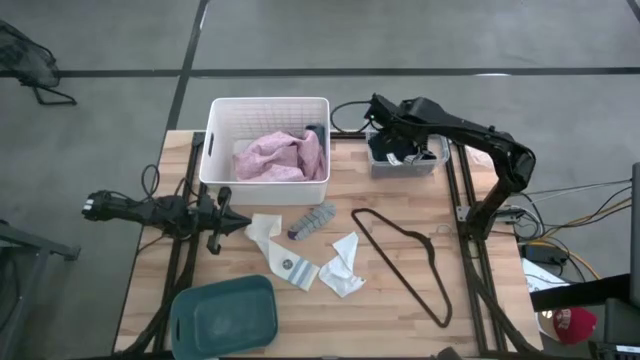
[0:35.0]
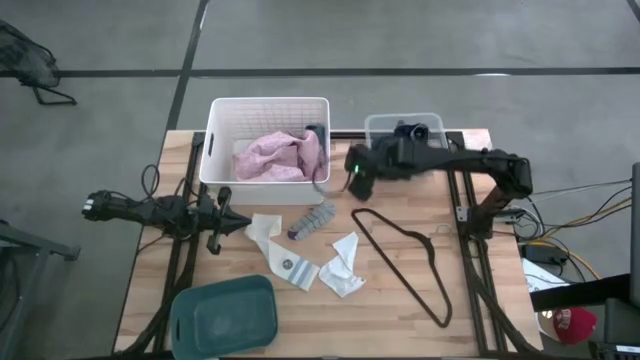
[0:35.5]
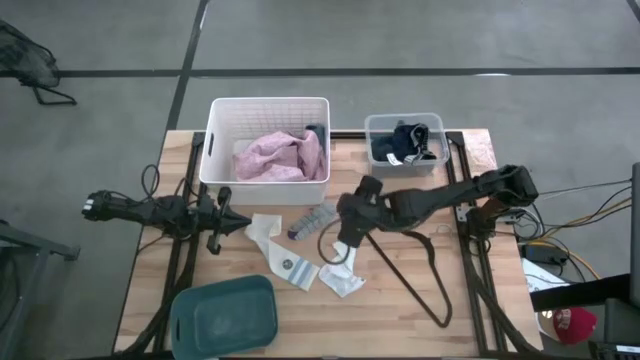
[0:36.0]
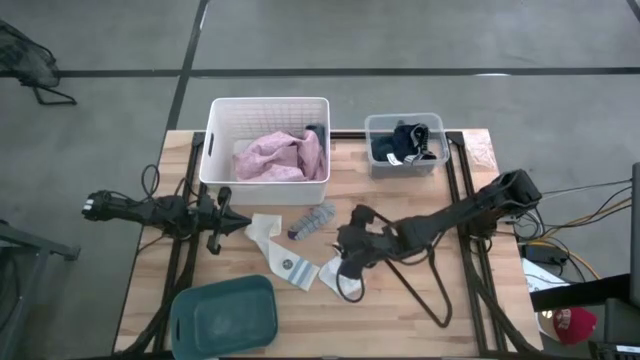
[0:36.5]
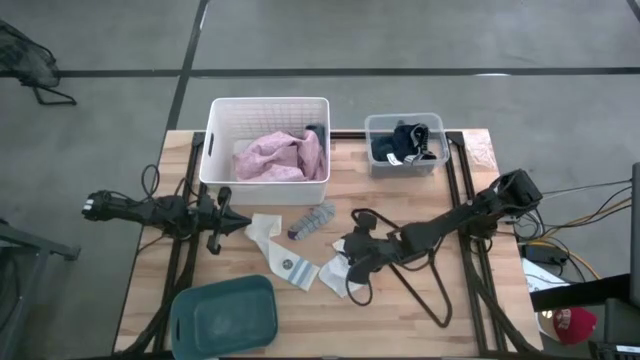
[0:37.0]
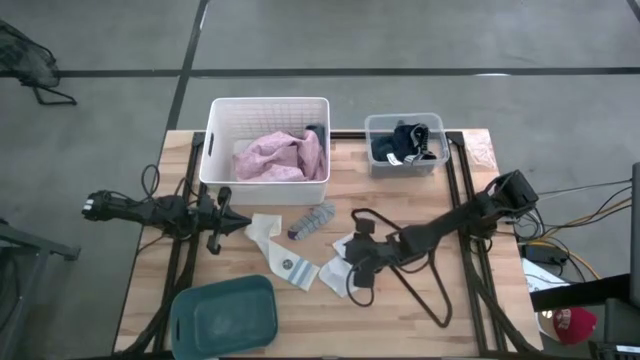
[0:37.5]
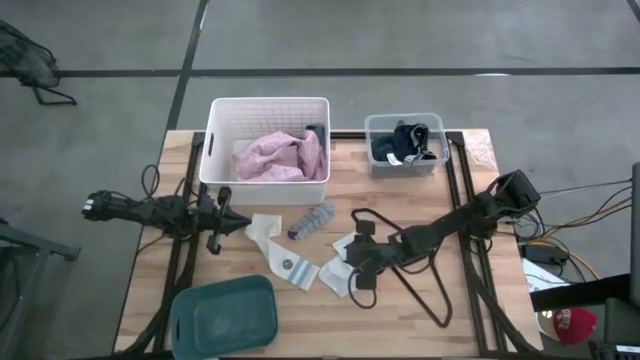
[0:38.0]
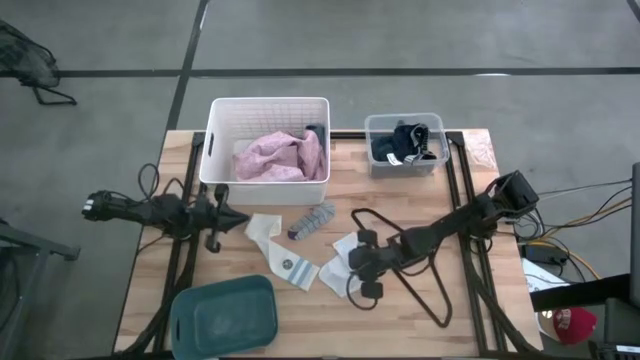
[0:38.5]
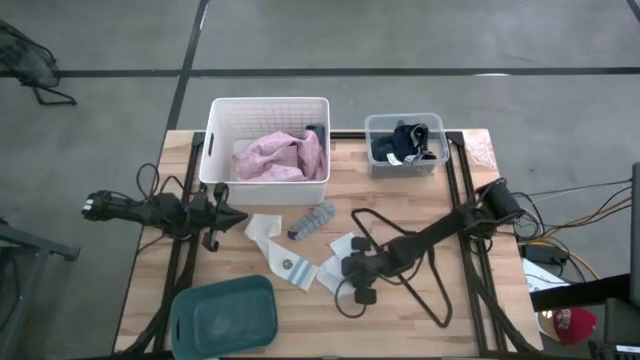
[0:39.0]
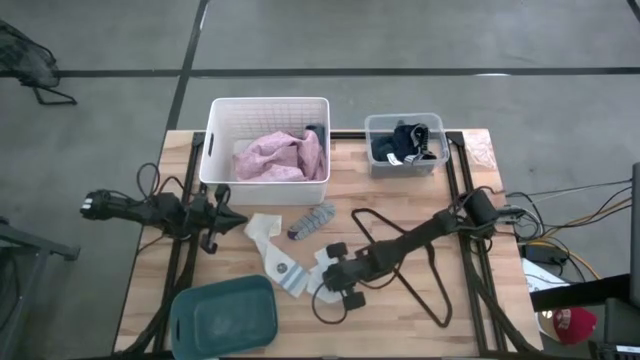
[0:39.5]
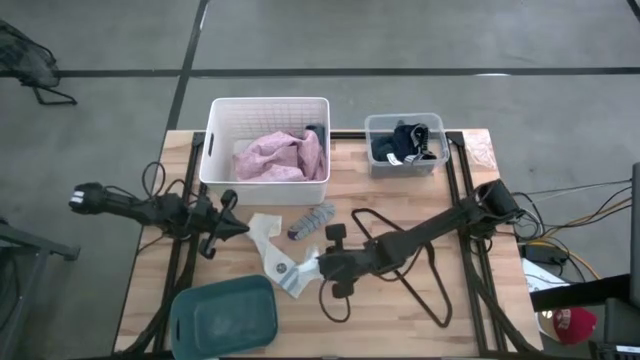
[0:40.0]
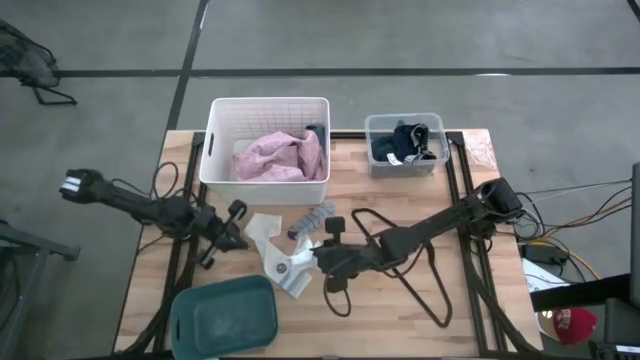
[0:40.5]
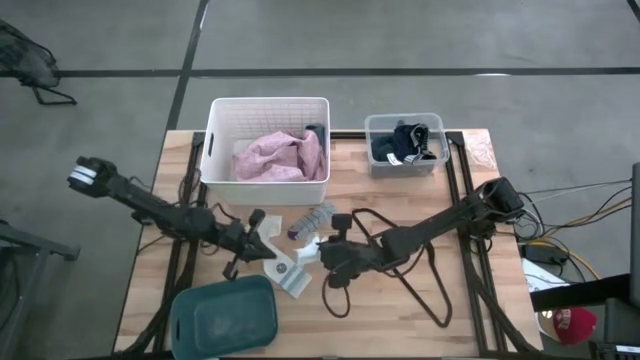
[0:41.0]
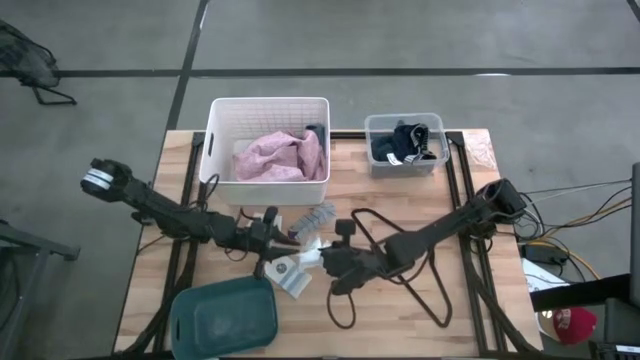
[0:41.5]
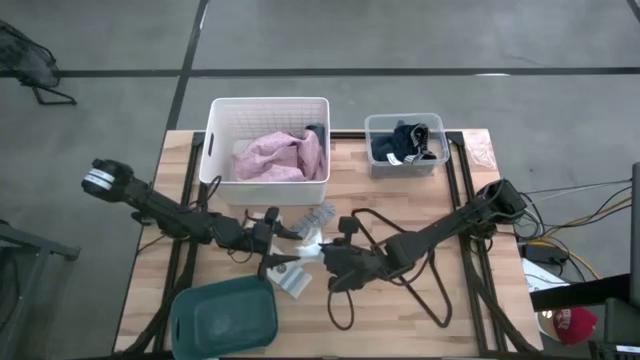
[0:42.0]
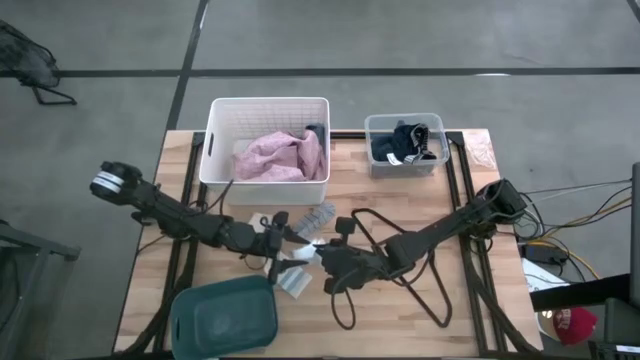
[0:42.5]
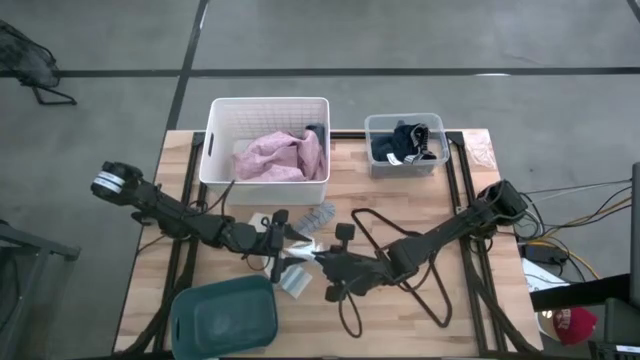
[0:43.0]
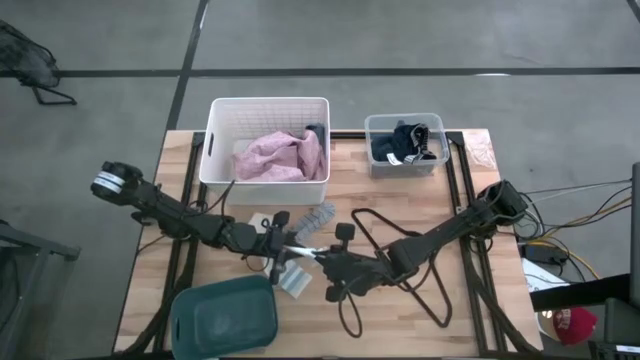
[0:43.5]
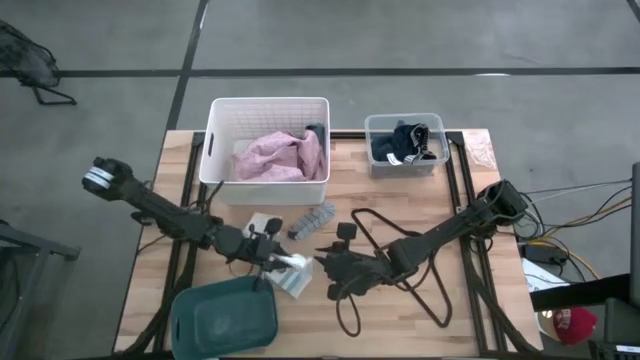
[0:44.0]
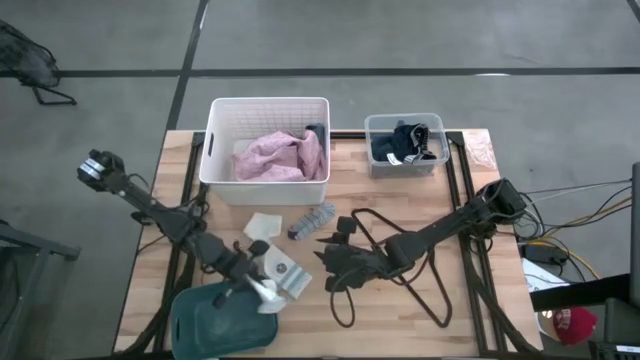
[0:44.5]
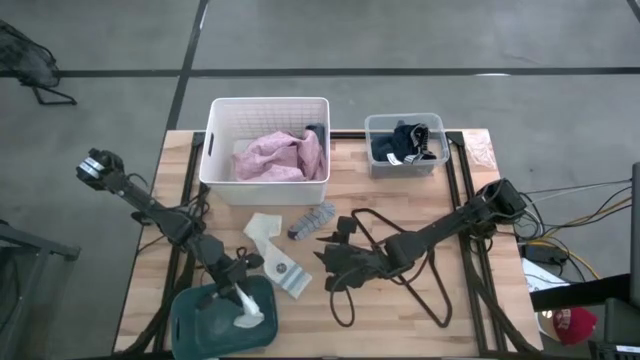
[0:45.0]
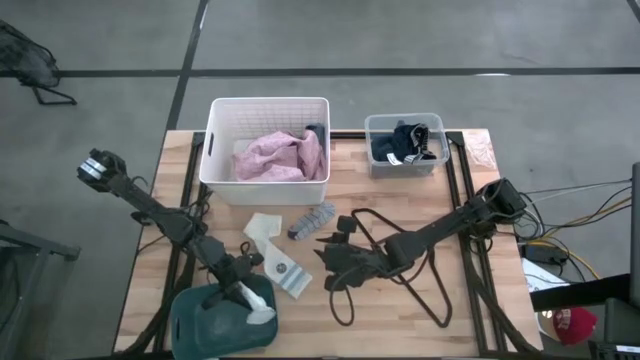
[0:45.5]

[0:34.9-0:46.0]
Task: Pick & Place Cloths
Put the white sock in the blue bin

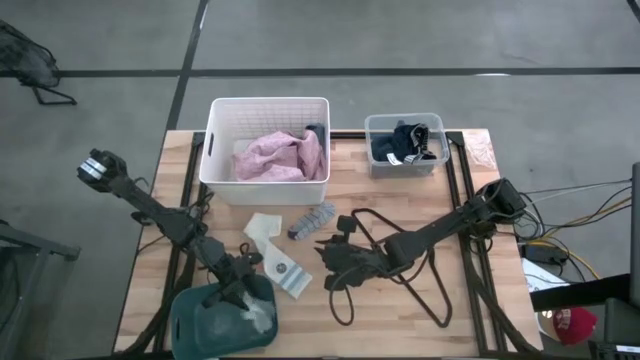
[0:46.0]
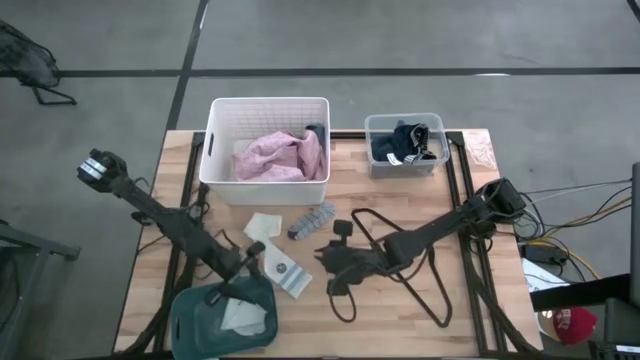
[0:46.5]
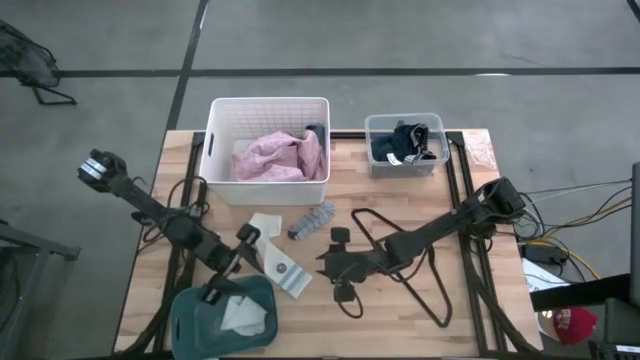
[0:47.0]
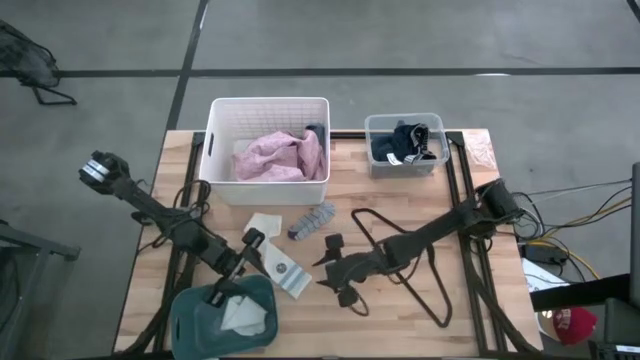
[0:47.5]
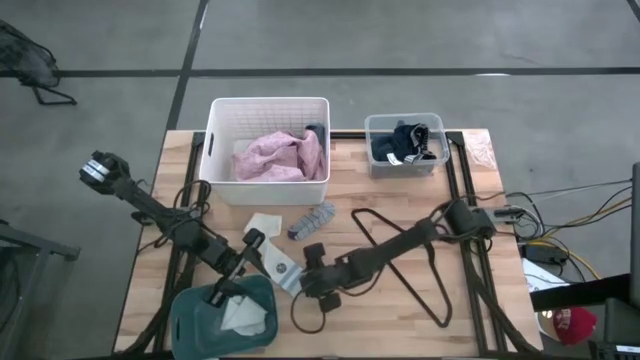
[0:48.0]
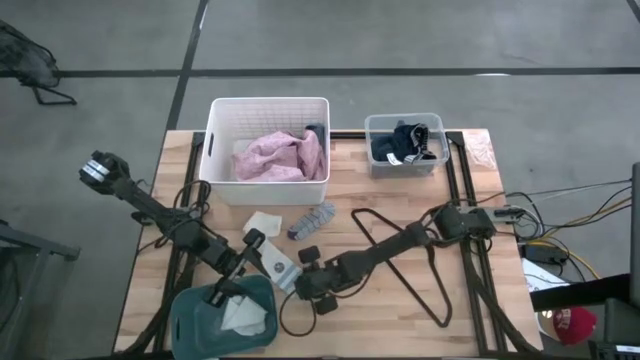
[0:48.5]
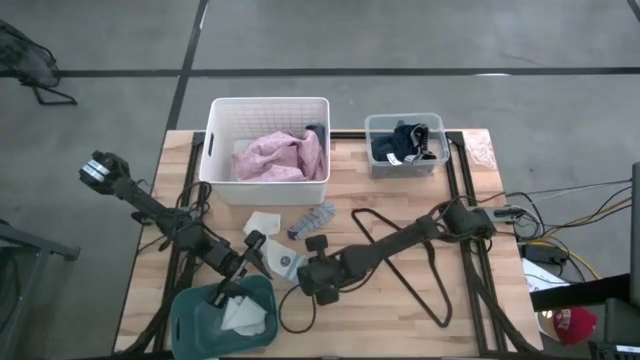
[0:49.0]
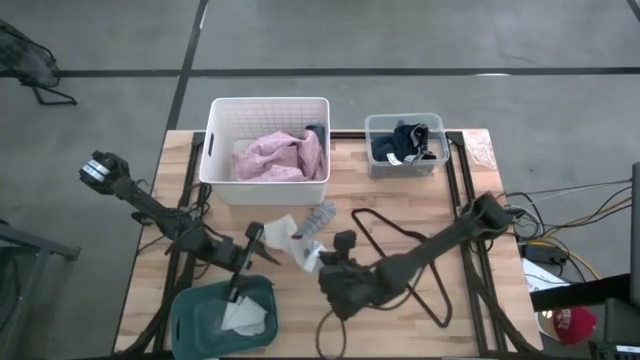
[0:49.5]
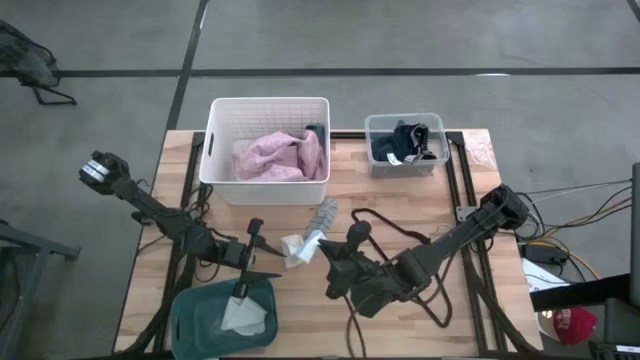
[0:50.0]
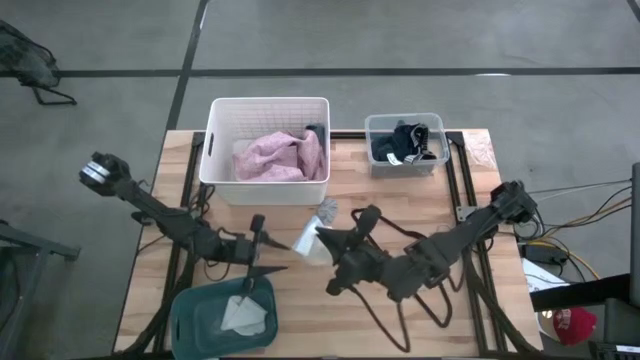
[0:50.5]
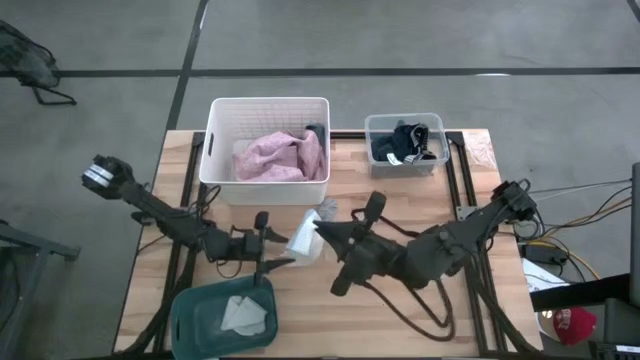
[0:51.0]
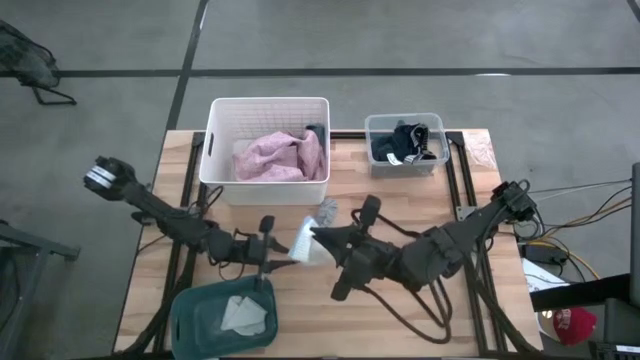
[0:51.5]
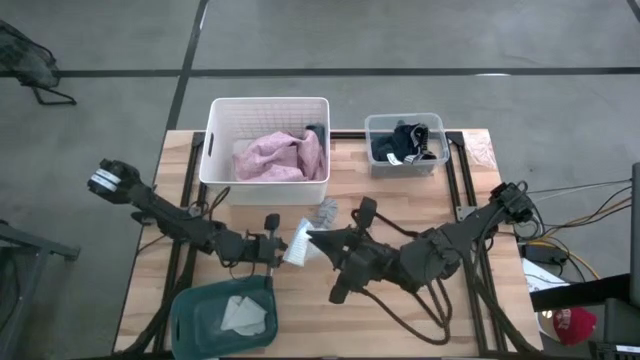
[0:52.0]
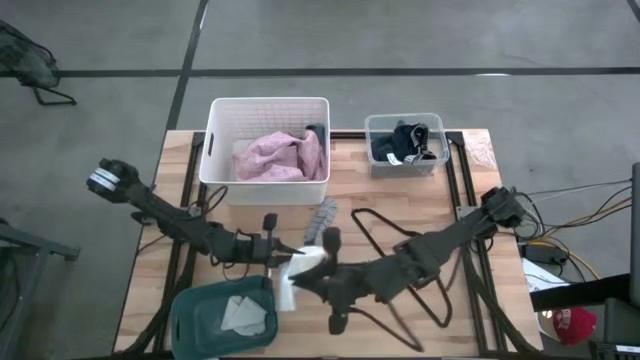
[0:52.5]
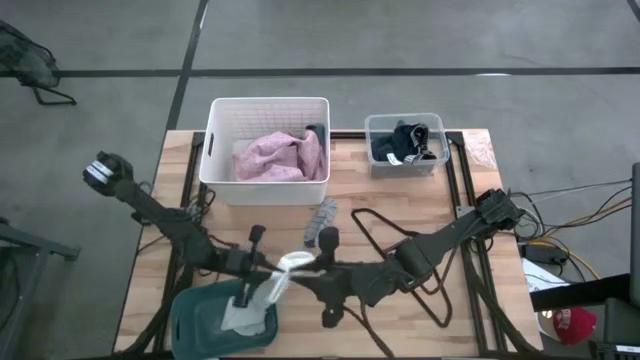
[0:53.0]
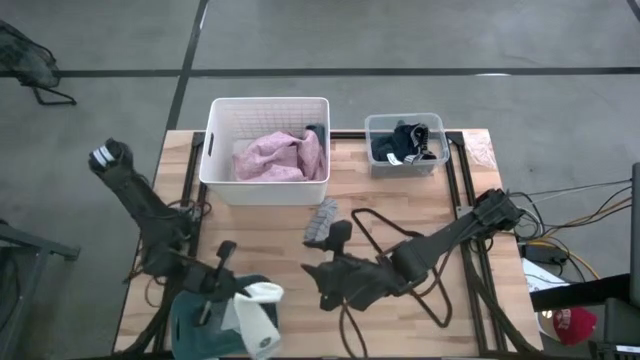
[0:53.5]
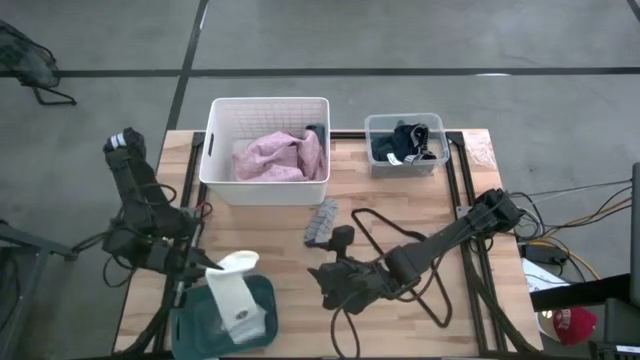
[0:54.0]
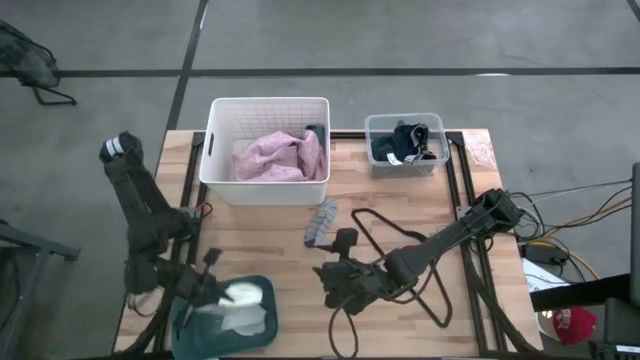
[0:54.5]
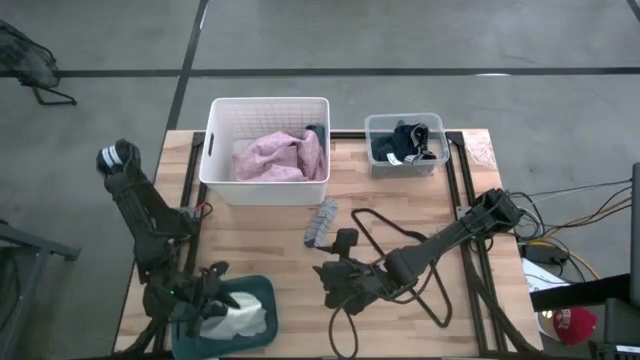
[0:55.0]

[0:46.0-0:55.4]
Put the blue sock in the blue bin

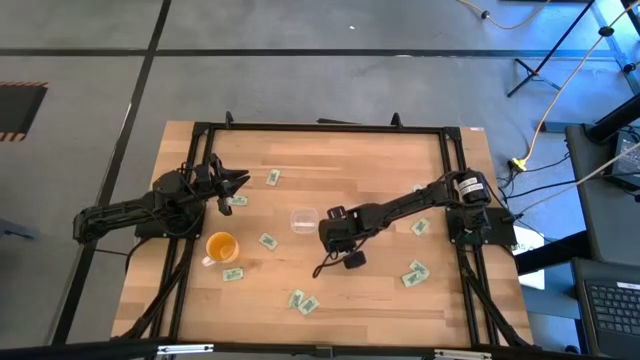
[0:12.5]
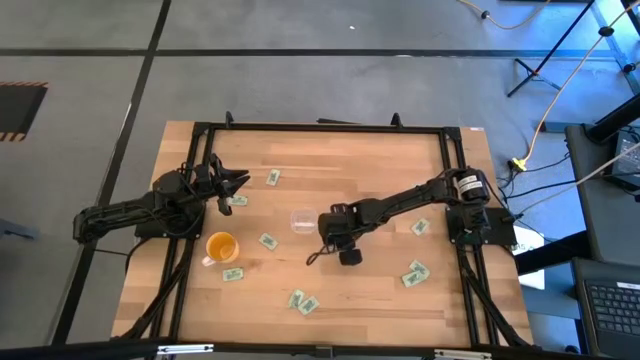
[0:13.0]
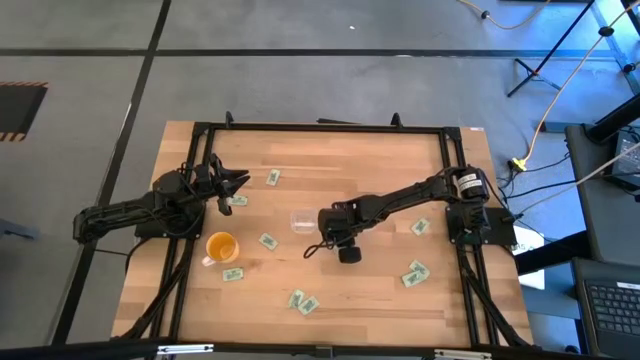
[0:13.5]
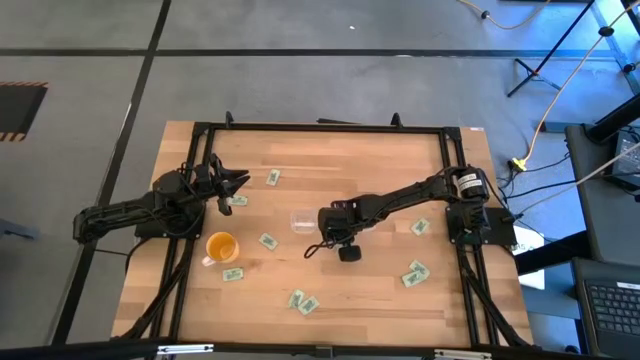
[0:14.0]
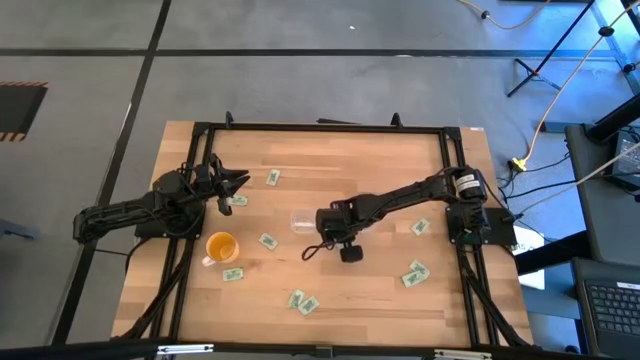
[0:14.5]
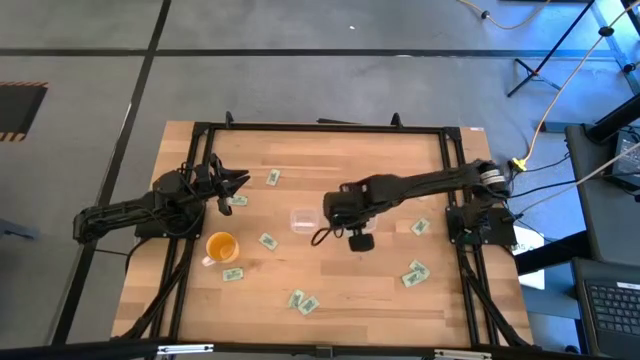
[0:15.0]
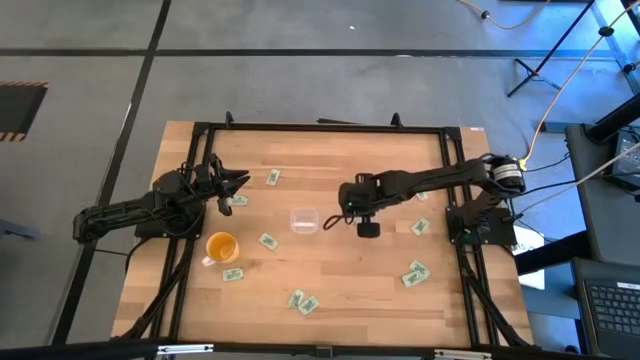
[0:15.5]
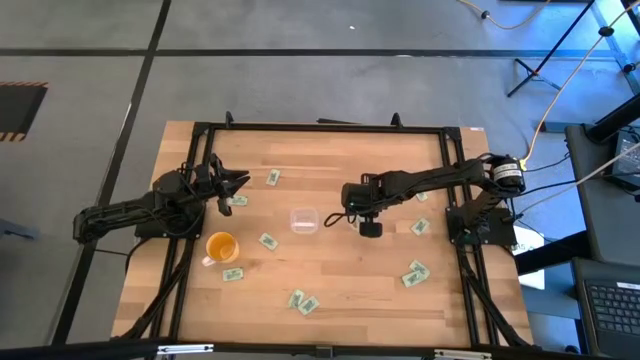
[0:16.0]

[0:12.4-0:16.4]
Task: Pick and place Stevia / Truvia into bins
Put the stevia packet into the right transparent container
